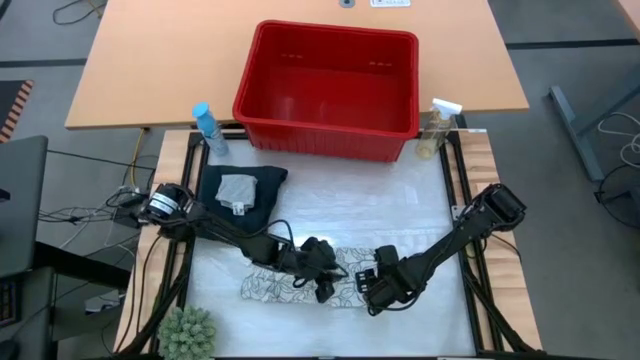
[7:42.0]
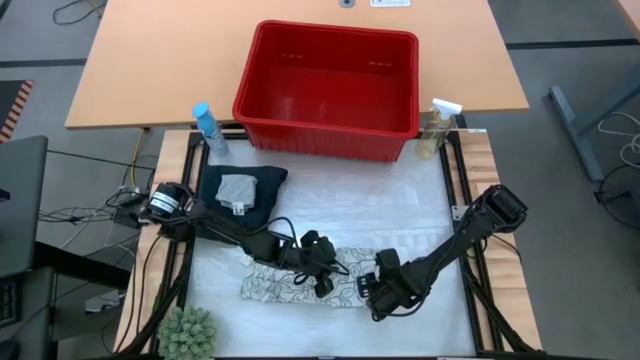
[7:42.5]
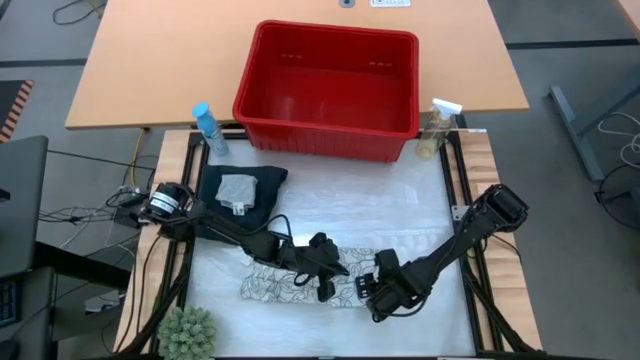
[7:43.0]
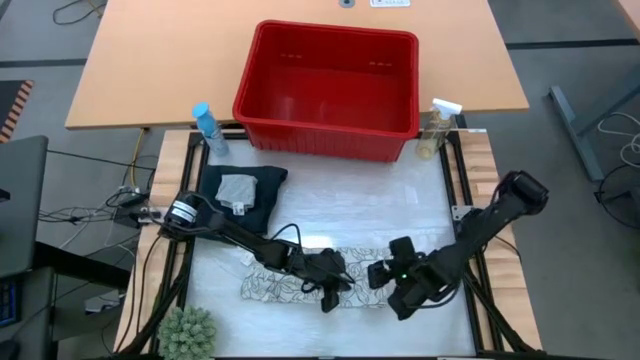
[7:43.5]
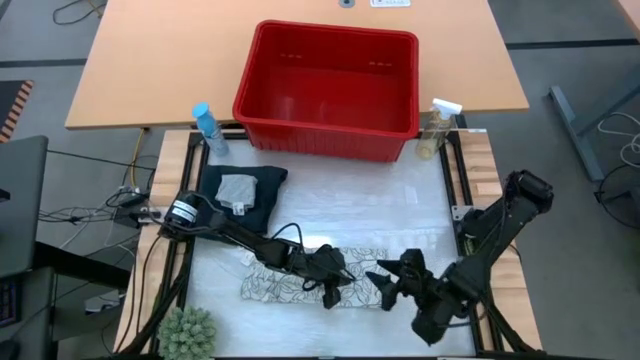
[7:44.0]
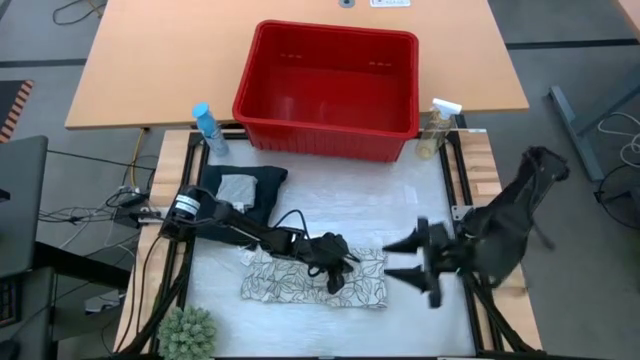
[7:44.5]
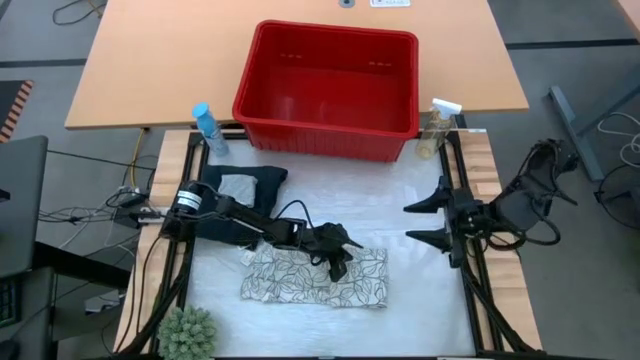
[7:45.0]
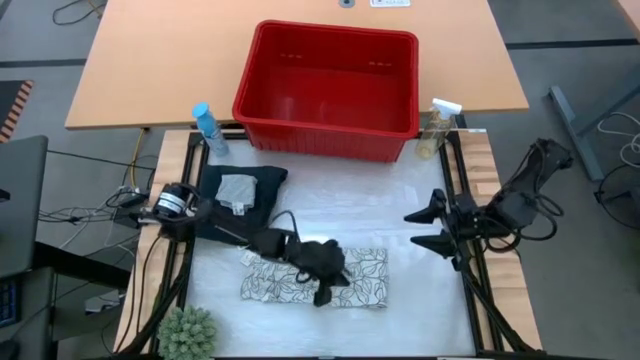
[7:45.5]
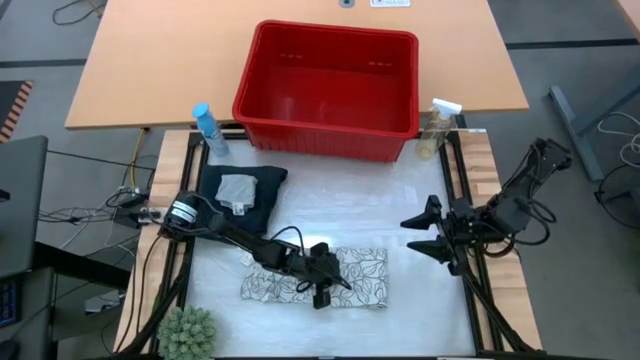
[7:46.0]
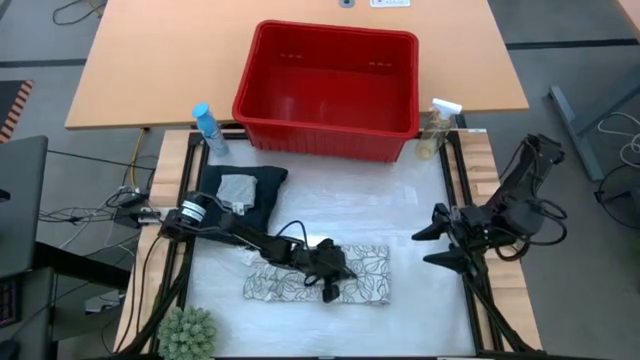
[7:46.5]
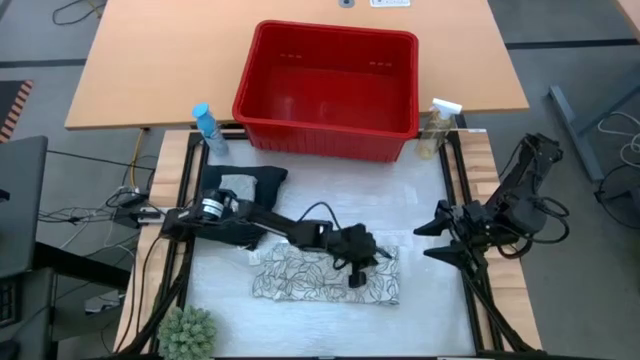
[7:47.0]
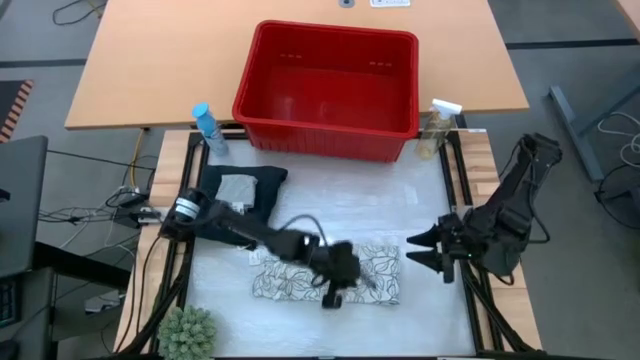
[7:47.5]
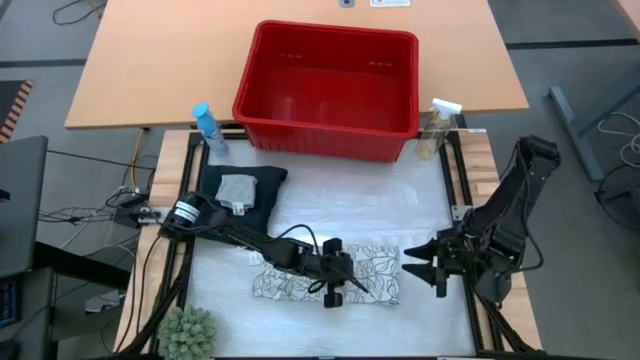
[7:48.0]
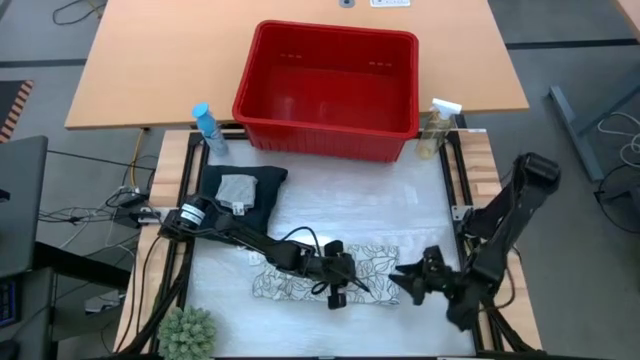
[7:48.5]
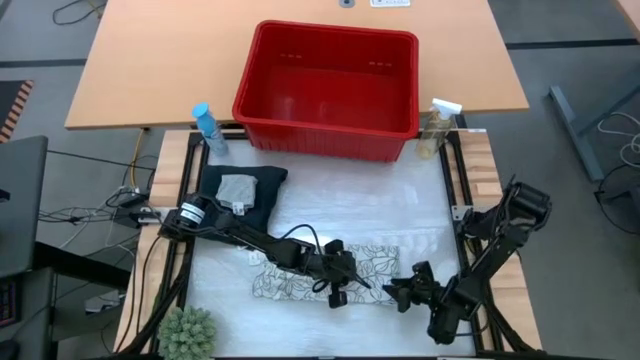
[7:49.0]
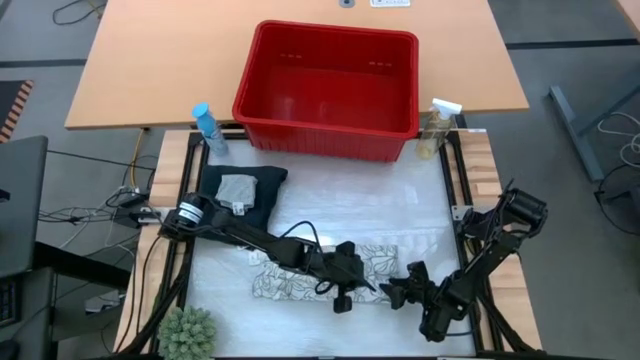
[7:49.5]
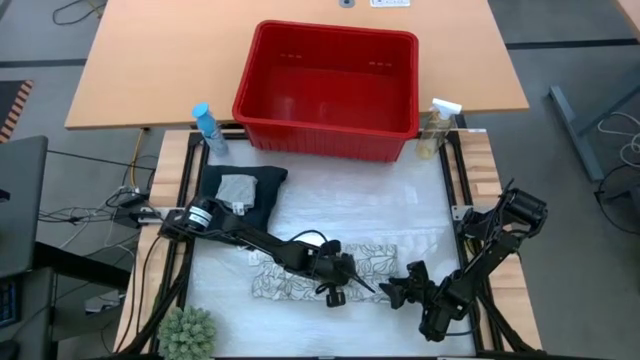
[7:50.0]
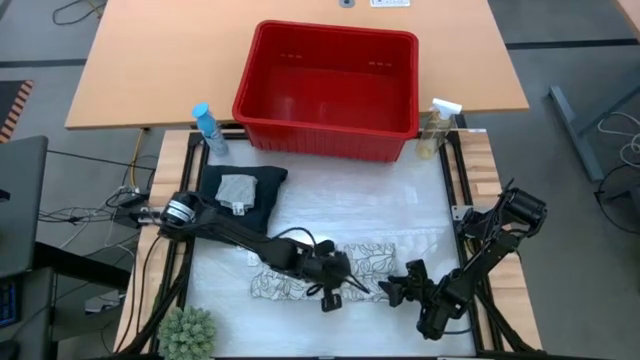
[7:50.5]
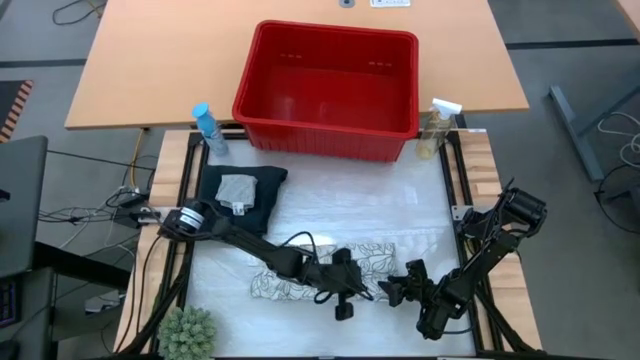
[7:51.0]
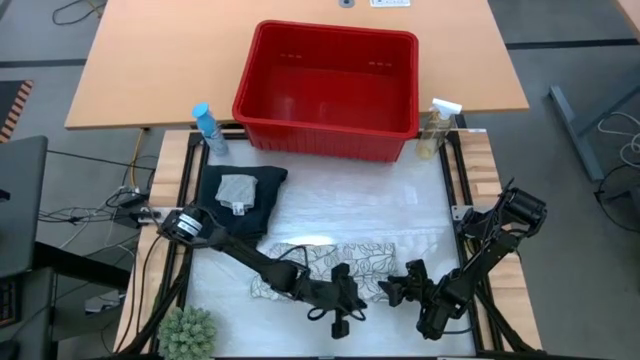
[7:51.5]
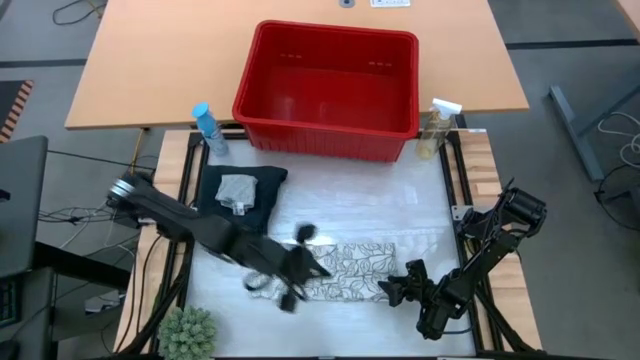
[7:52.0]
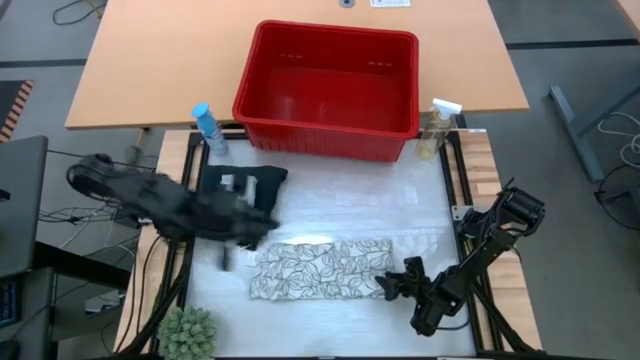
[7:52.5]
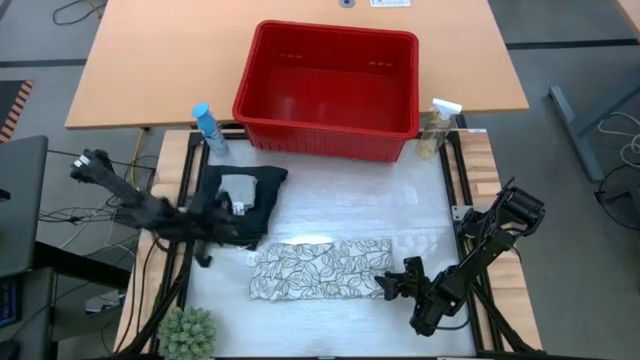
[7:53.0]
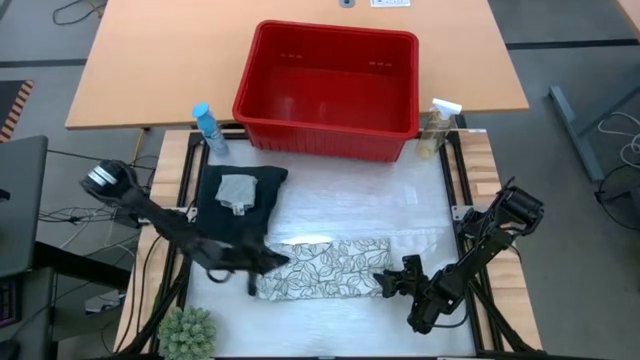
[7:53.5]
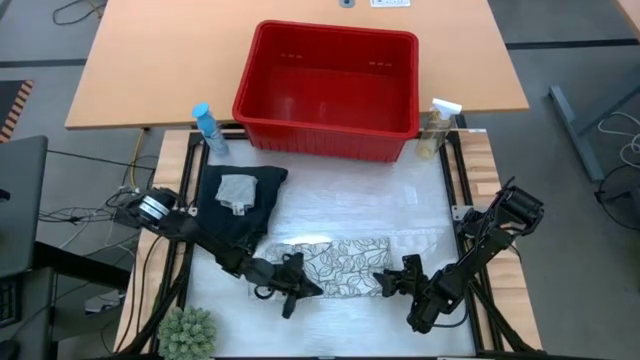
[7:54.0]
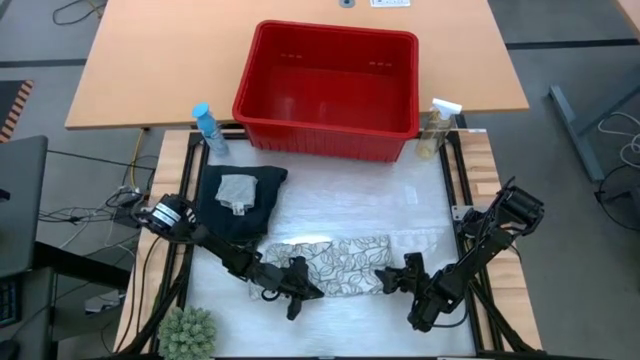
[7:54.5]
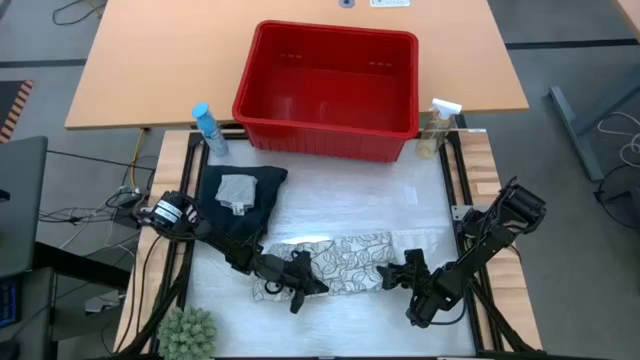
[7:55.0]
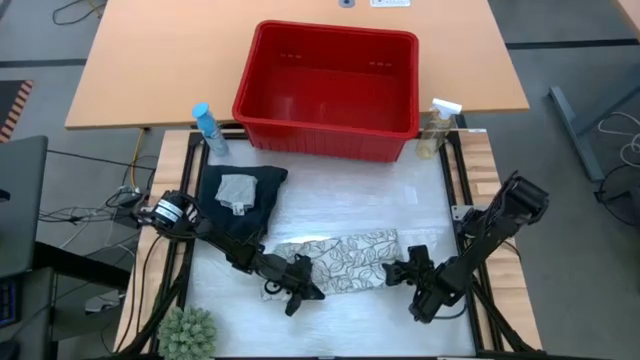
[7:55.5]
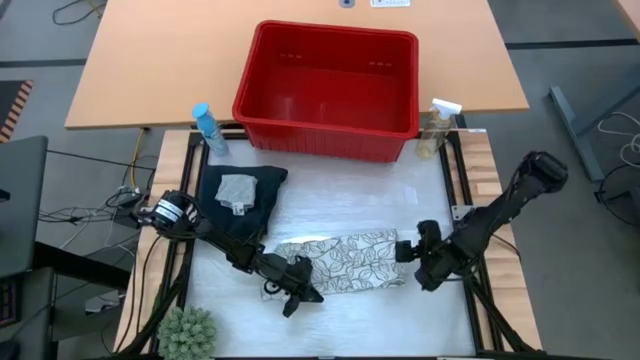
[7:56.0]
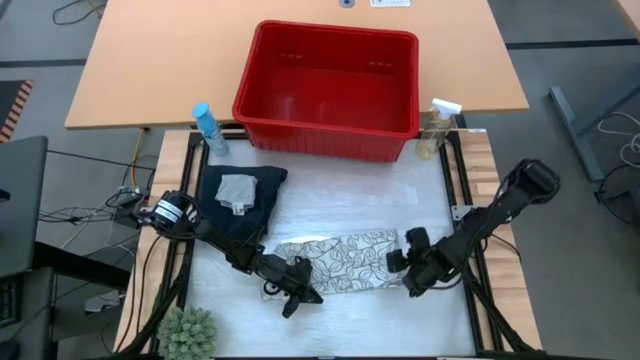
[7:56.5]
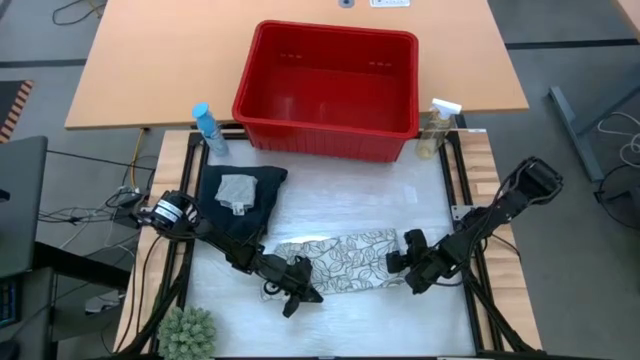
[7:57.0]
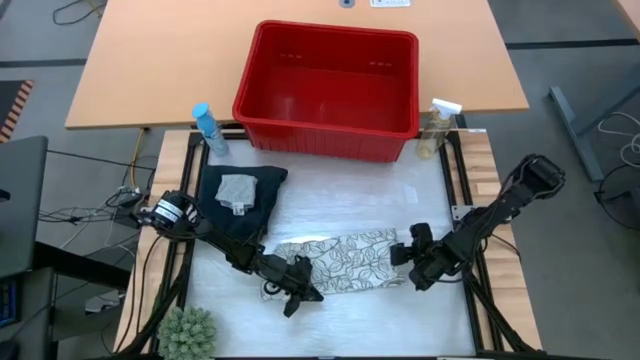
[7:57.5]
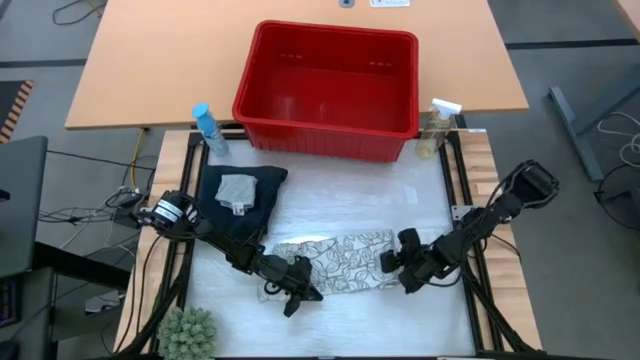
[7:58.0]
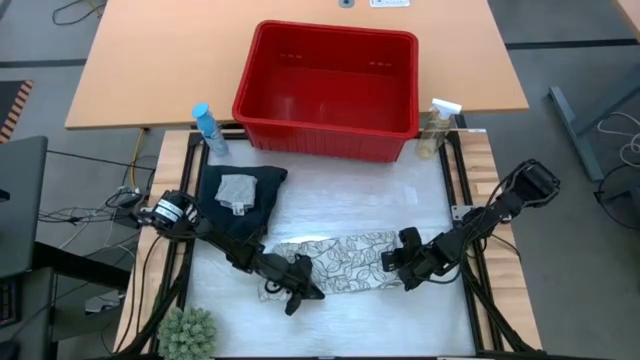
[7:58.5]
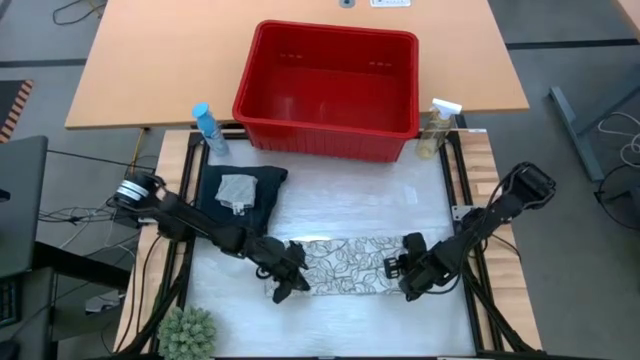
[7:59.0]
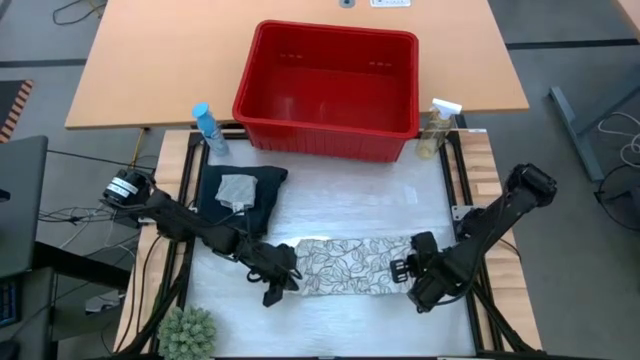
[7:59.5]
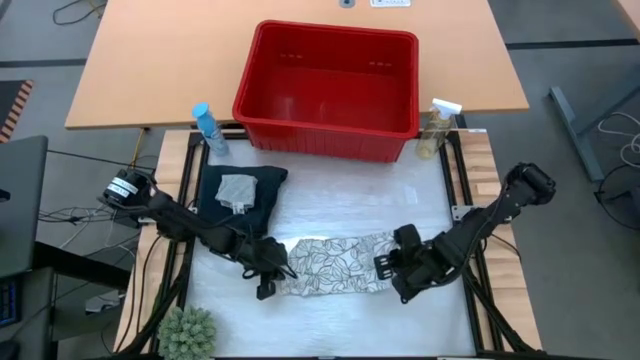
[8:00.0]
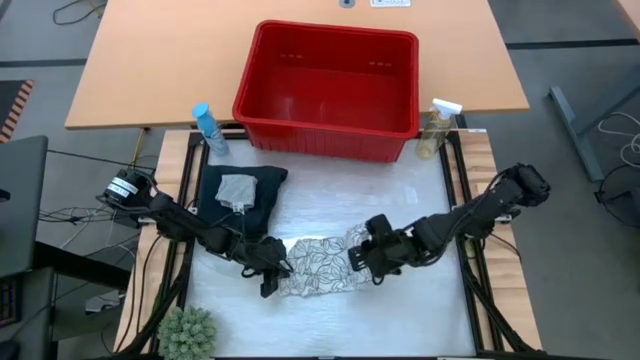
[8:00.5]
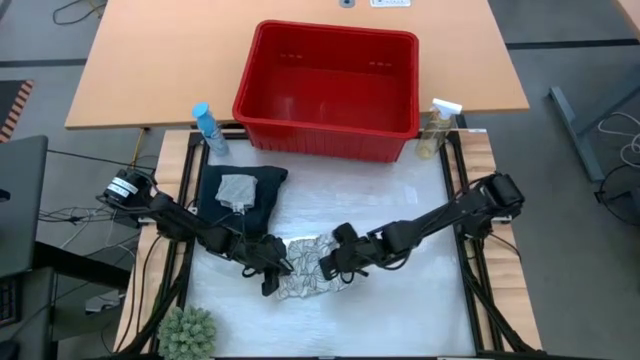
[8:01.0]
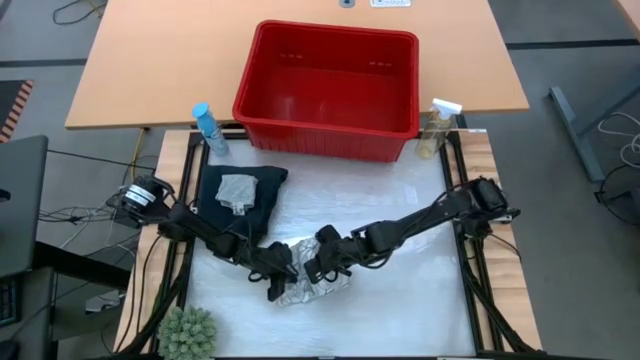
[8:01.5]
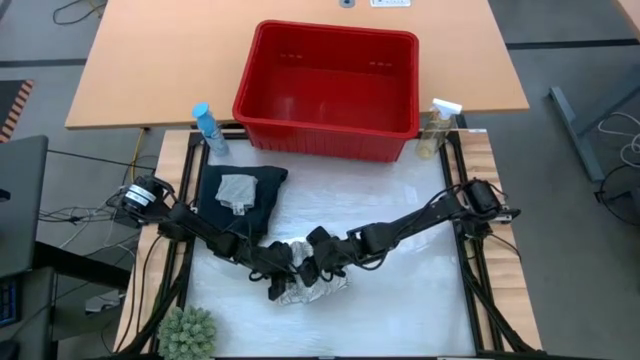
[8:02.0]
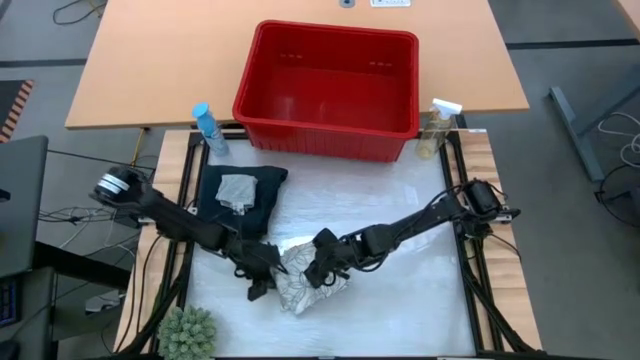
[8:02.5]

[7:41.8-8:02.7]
Task: Fold Laundry from Bin
Fold the white patterned shirt
